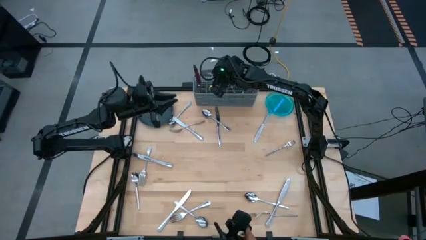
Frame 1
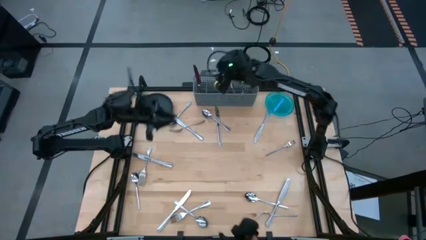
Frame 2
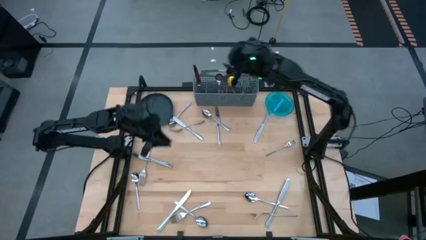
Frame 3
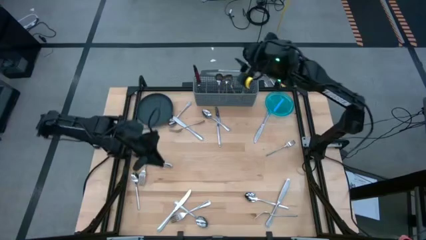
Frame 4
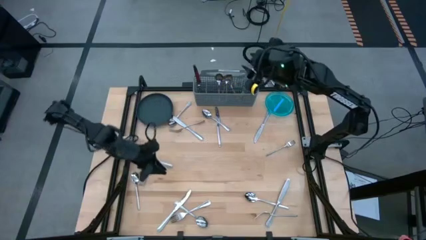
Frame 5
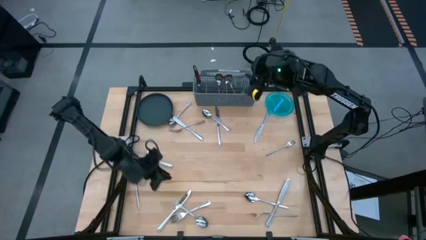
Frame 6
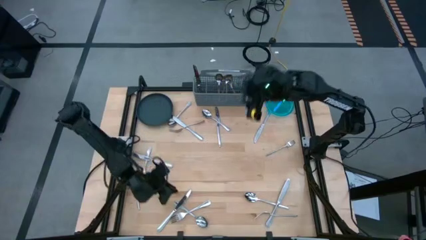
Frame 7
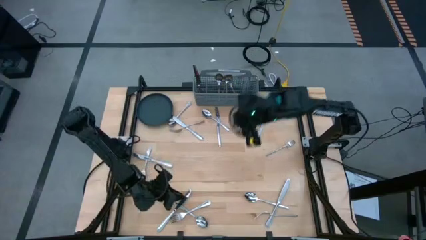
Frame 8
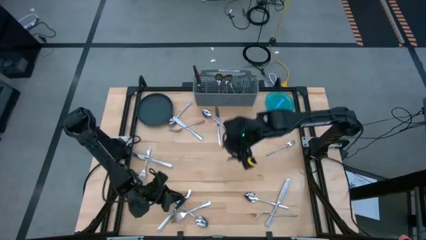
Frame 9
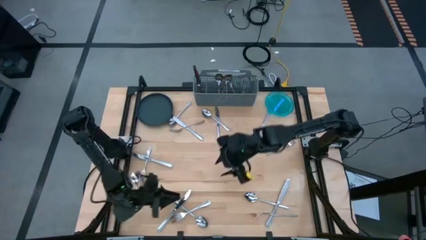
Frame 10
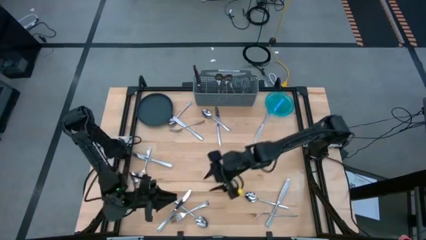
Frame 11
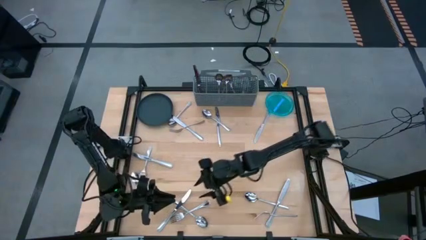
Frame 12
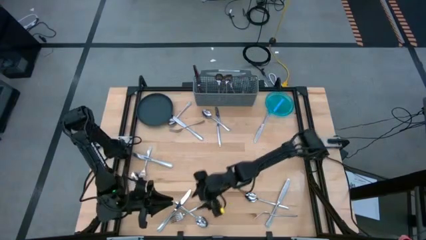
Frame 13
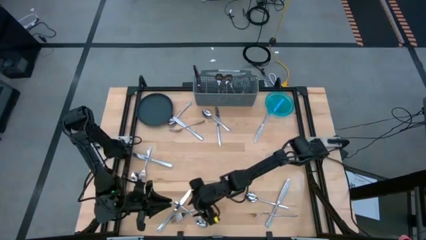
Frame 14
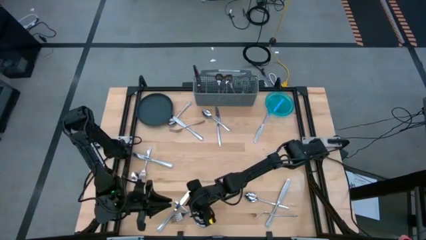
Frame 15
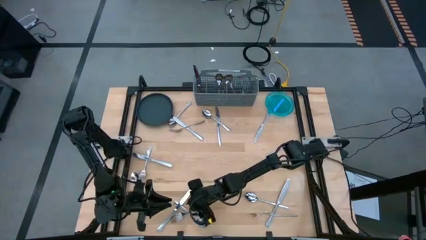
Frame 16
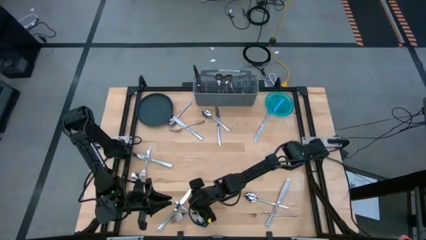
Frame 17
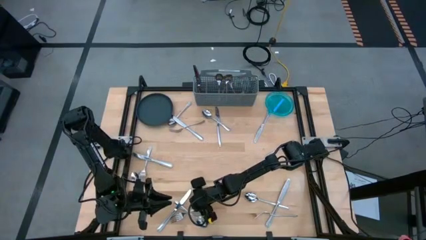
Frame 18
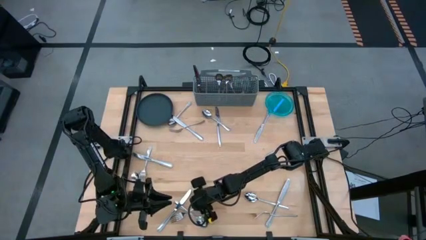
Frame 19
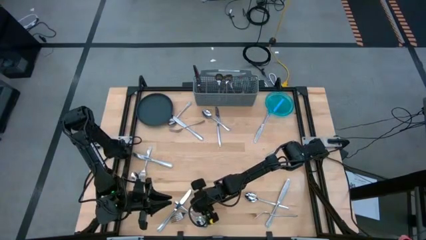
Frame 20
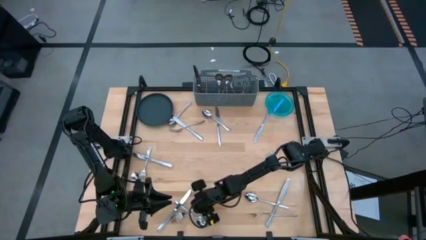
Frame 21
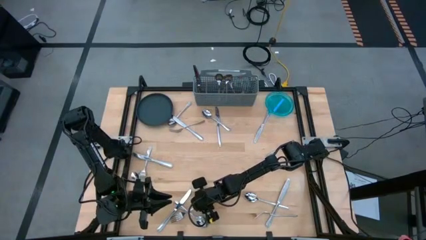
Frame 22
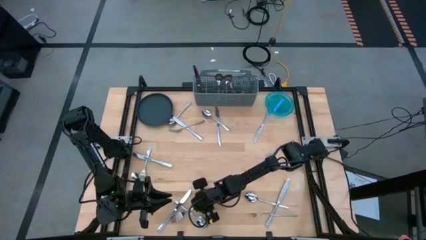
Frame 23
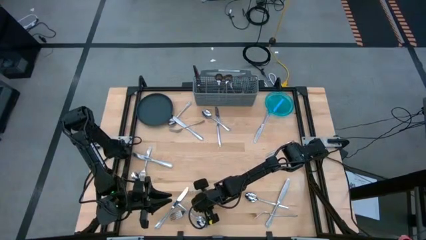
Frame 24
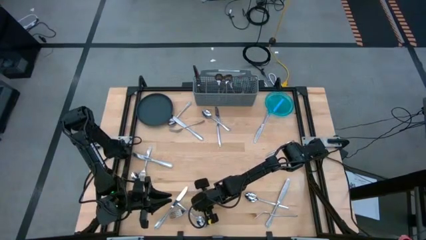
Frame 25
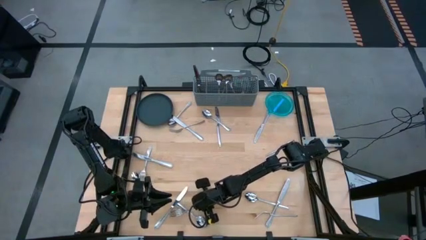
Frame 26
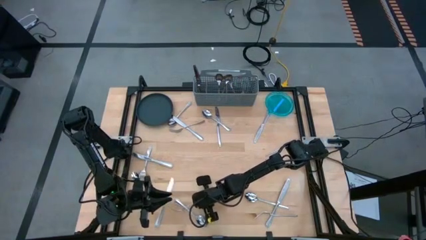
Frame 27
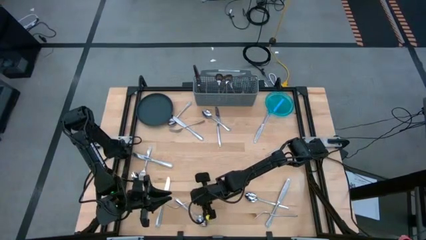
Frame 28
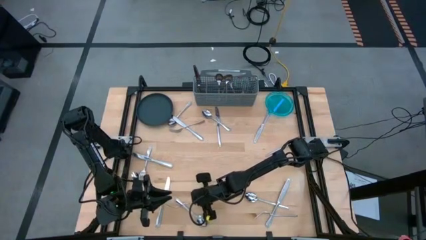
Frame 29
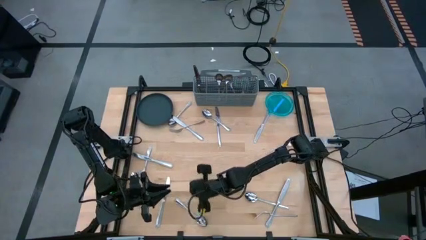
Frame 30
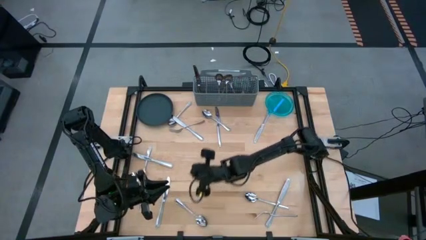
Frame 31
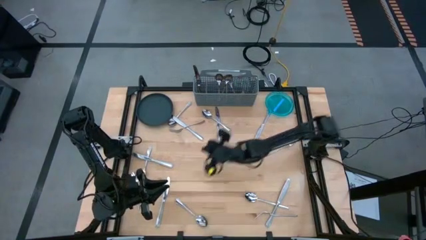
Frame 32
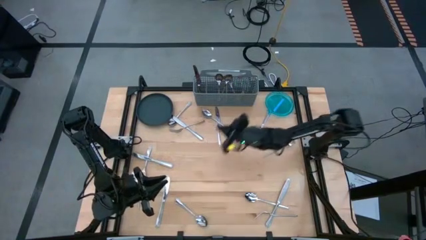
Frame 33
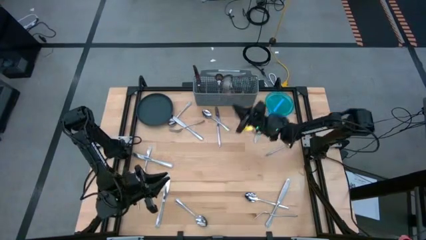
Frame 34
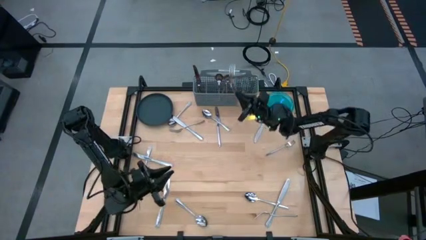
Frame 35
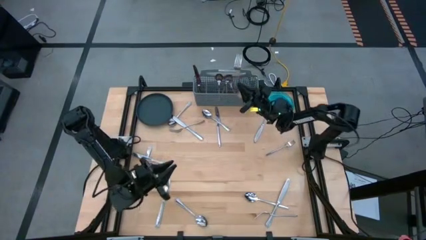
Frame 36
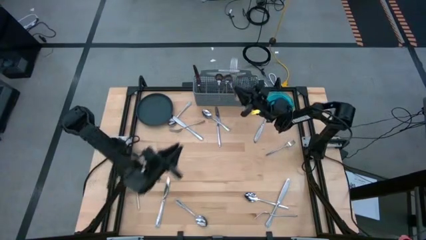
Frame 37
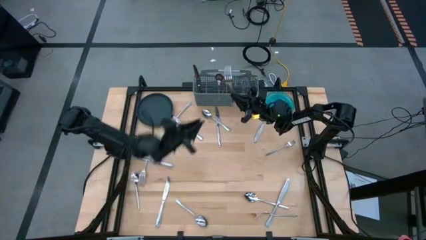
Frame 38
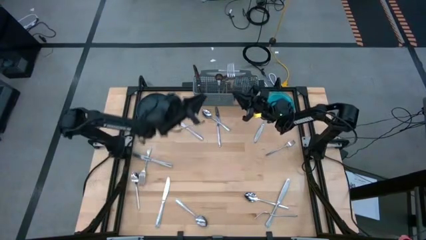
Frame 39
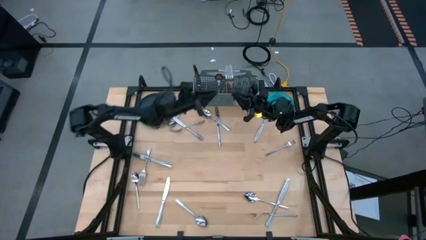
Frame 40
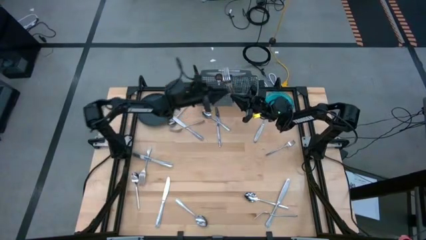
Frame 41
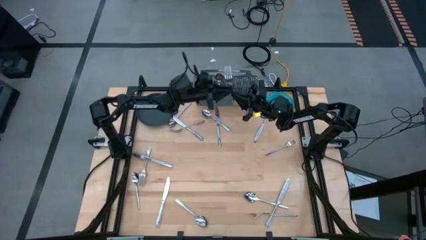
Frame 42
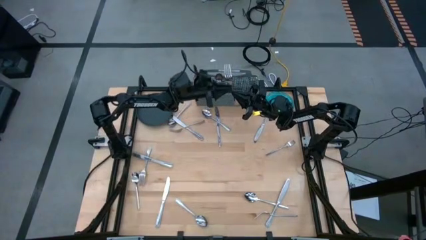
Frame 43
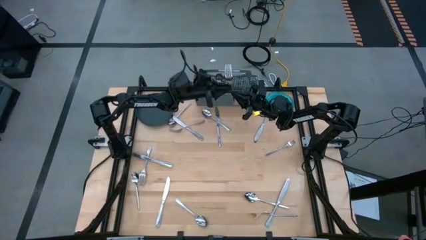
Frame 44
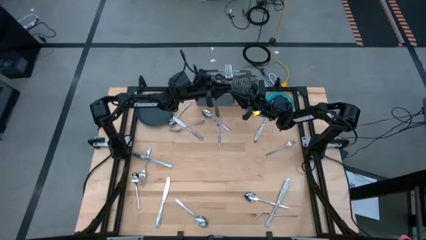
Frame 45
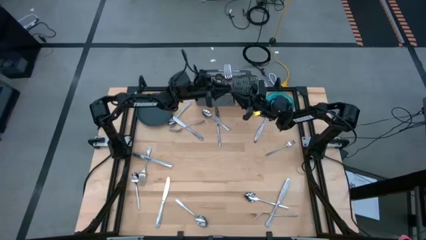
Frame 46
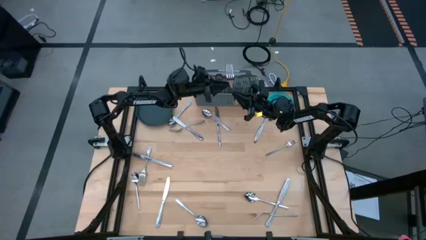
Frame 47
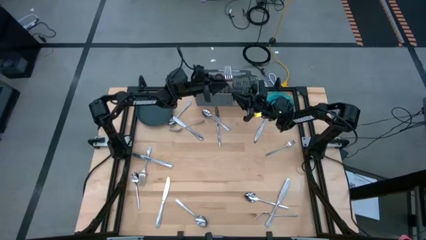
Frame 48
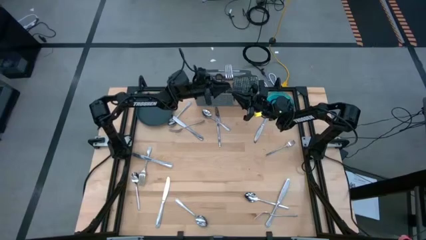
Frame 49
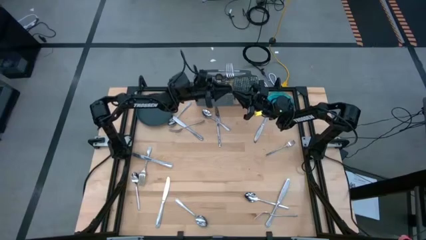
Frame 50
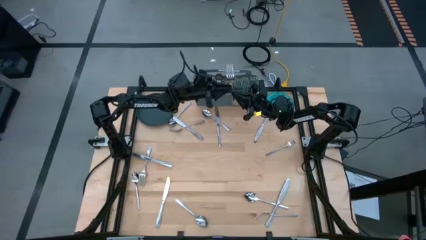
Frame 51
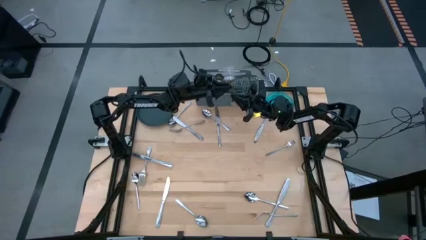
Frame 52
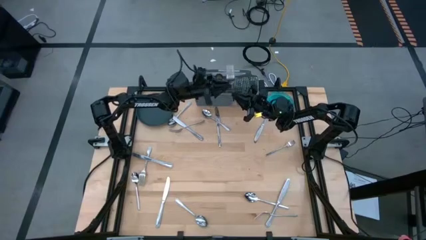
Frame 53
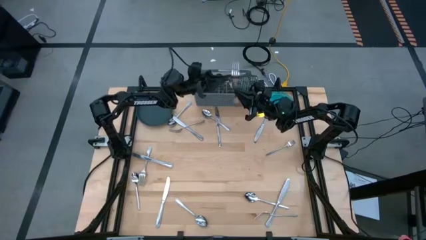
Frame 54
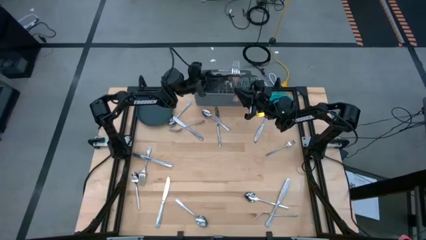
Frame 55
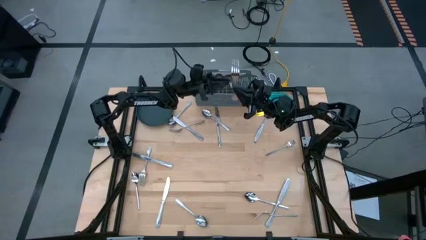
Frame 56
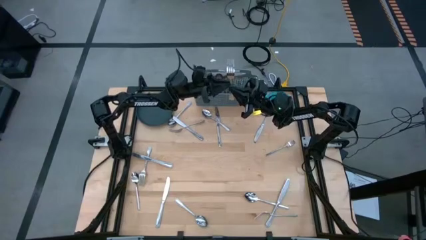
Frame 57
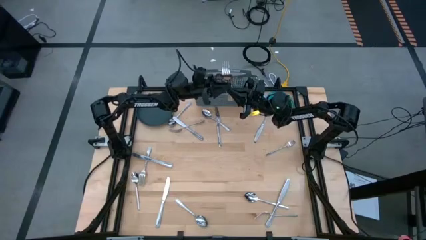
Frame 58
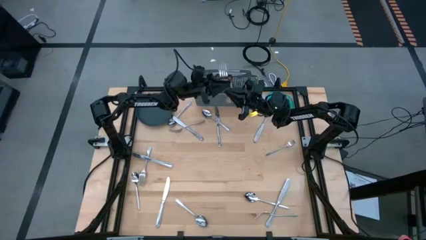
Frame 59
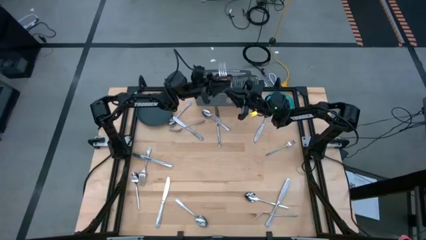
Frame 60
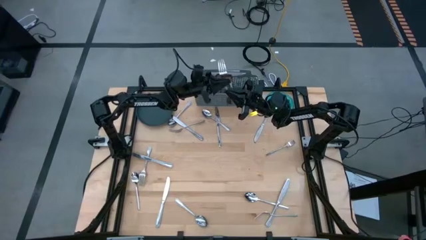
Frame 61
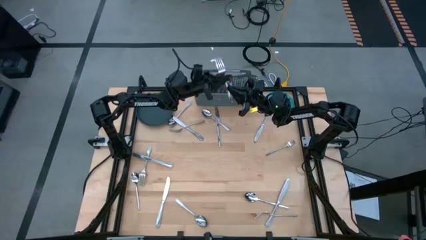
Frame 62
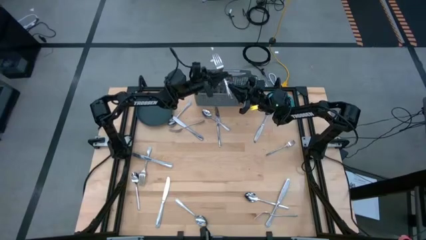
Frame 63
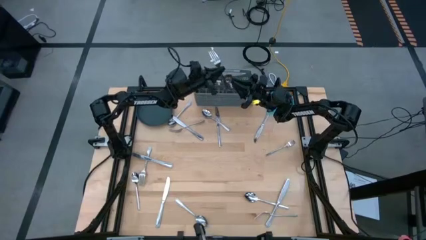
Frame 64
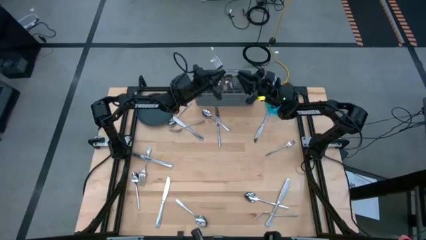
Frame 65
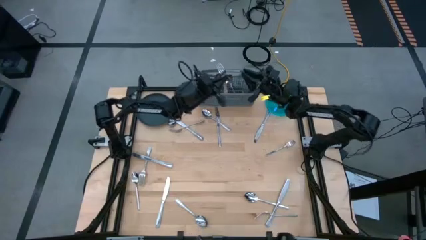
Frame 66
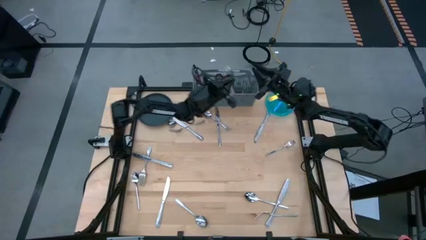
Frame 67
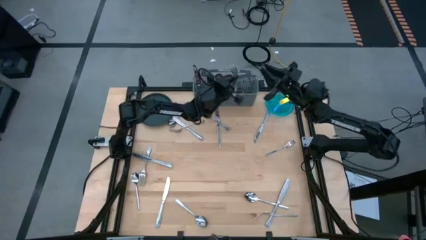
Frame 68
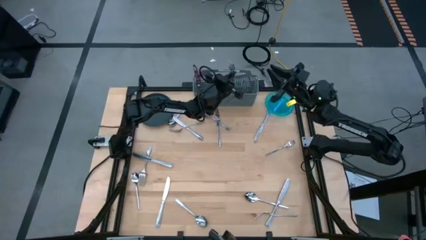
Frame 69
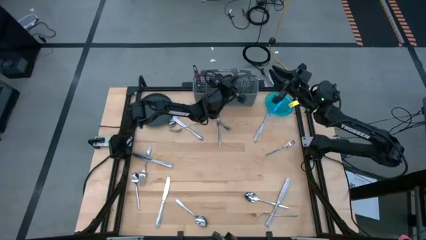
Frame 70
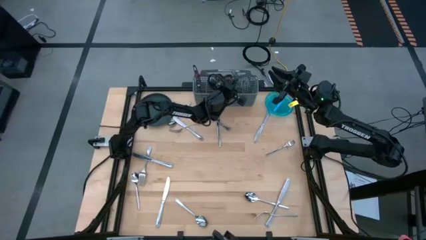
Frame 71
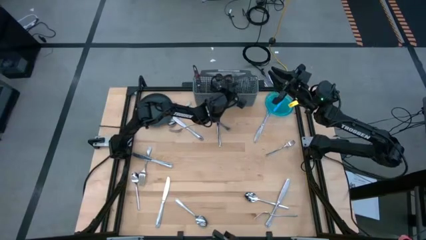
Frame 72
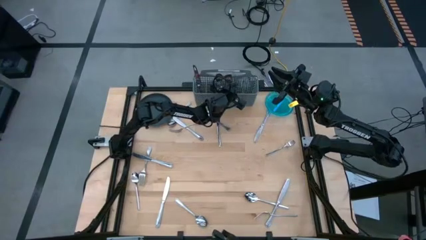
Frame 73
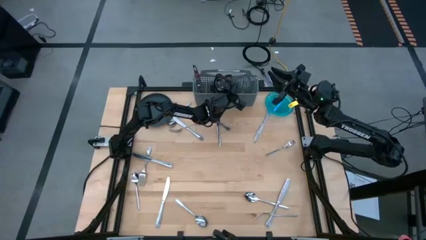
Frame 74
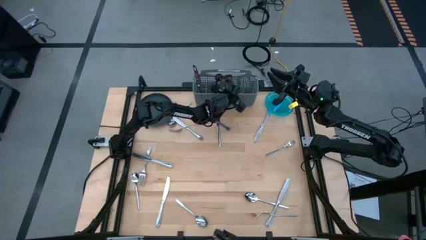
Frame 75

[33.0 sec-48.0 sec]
Task: Sort silverware
Put the fork into the silverware basket
